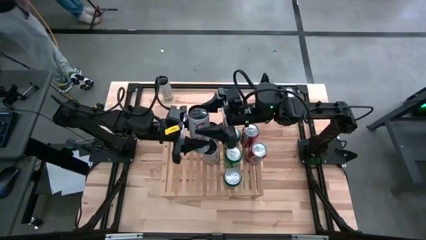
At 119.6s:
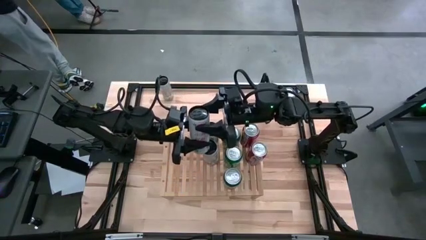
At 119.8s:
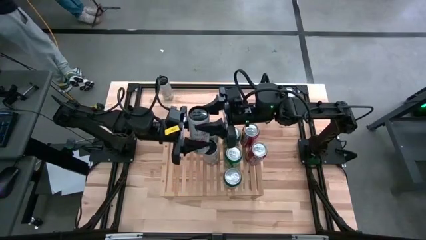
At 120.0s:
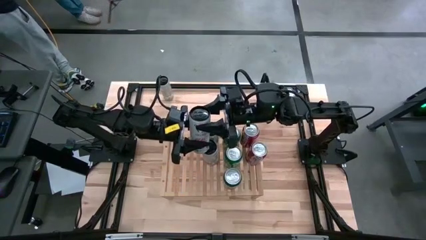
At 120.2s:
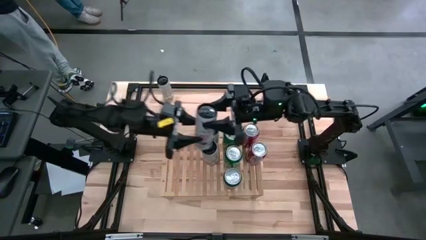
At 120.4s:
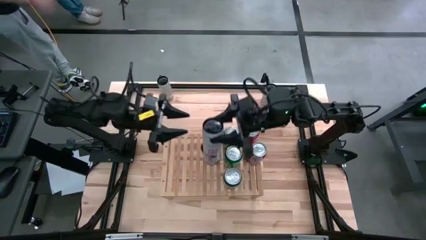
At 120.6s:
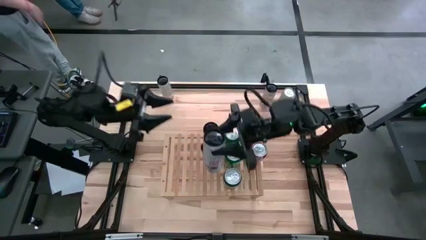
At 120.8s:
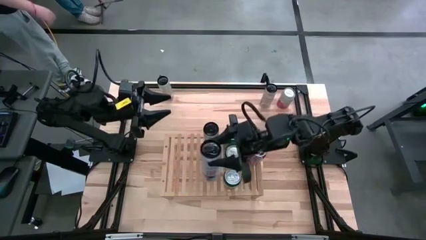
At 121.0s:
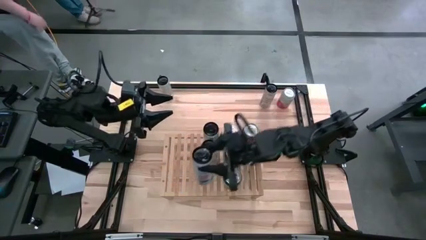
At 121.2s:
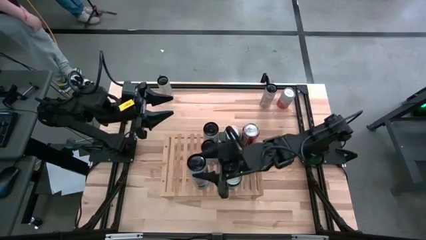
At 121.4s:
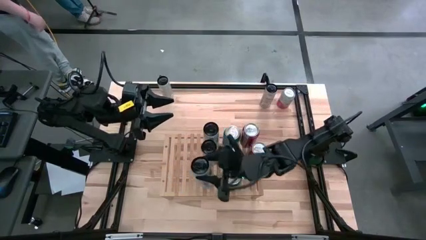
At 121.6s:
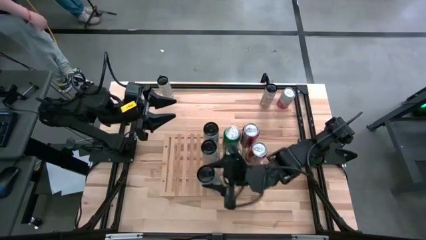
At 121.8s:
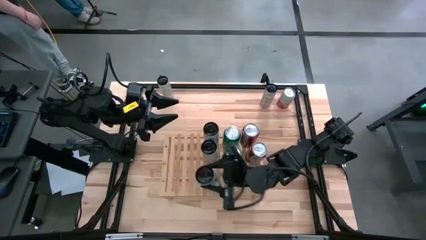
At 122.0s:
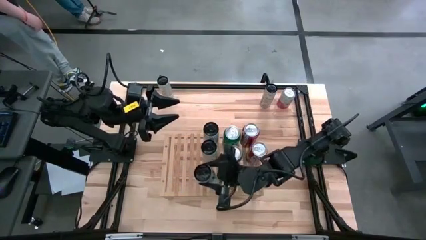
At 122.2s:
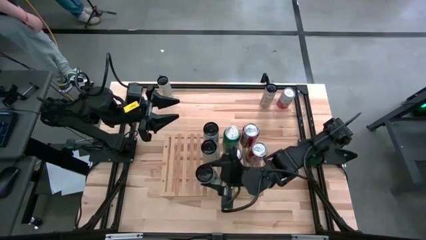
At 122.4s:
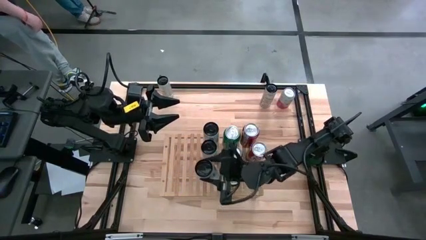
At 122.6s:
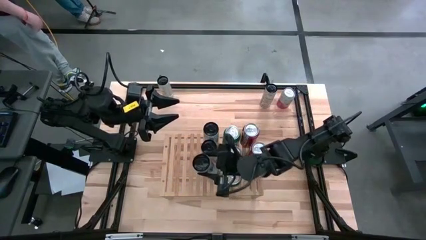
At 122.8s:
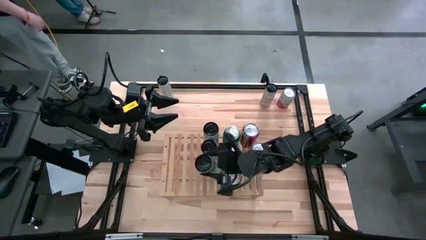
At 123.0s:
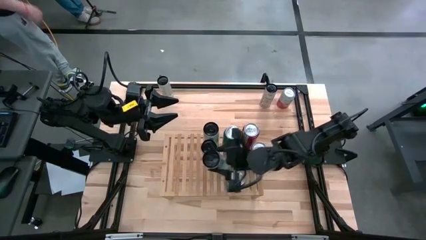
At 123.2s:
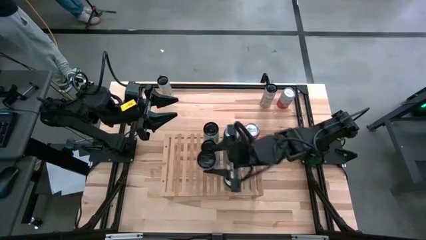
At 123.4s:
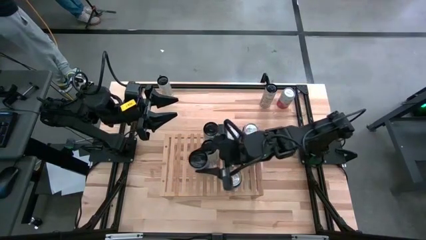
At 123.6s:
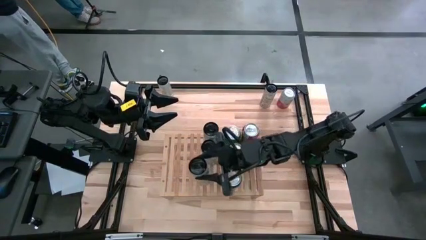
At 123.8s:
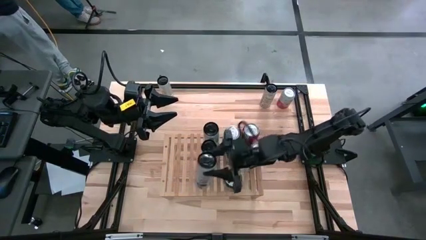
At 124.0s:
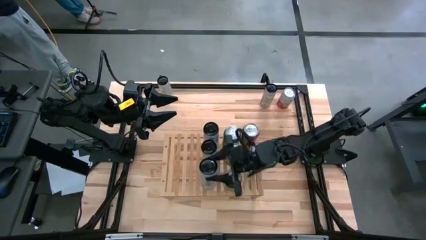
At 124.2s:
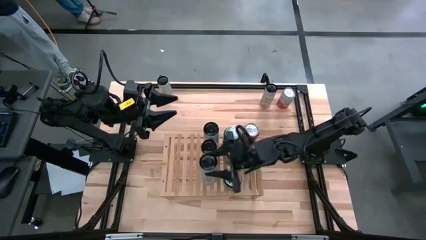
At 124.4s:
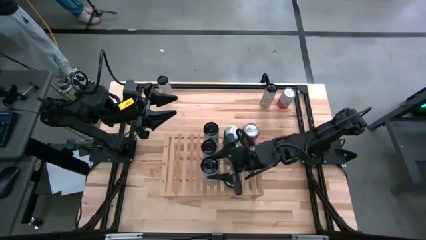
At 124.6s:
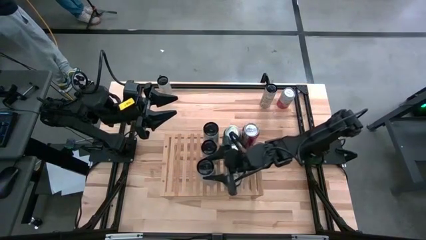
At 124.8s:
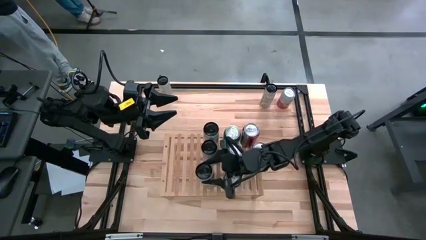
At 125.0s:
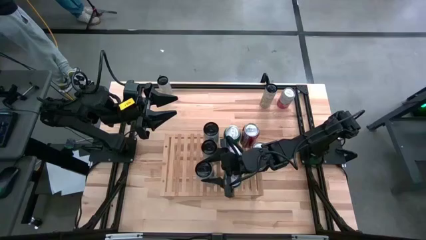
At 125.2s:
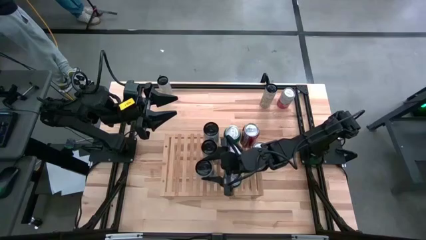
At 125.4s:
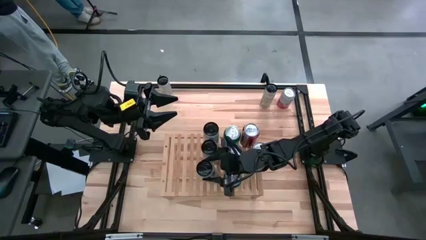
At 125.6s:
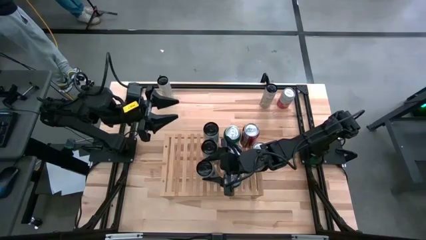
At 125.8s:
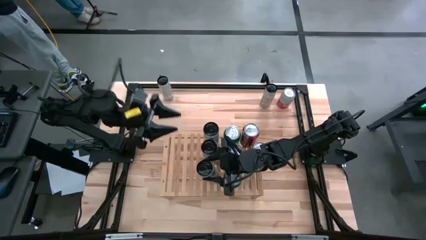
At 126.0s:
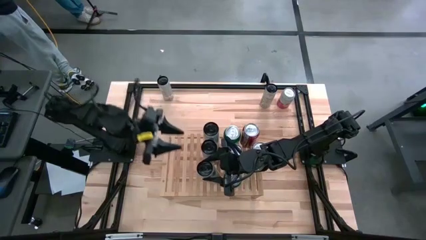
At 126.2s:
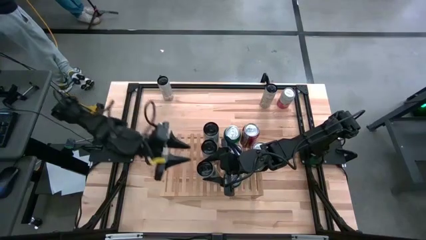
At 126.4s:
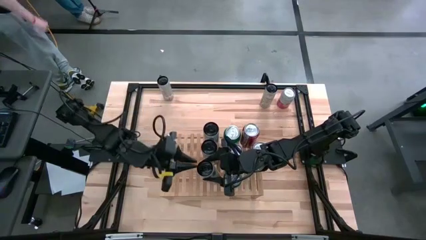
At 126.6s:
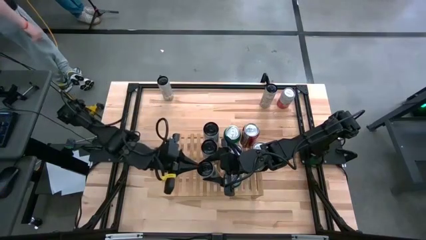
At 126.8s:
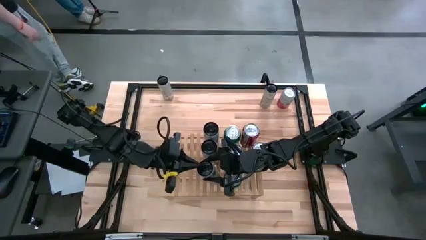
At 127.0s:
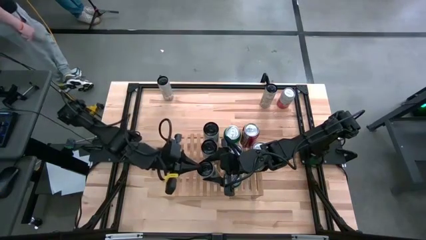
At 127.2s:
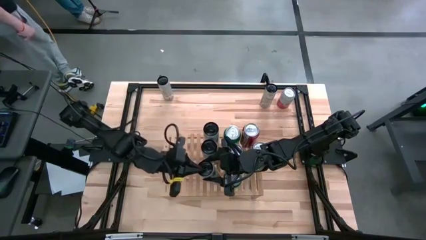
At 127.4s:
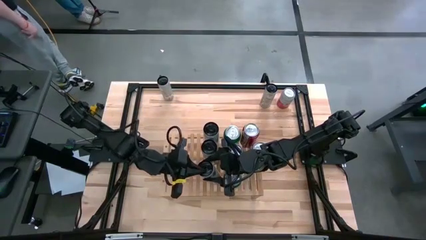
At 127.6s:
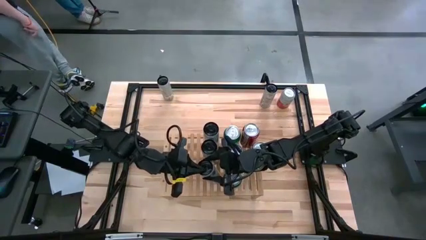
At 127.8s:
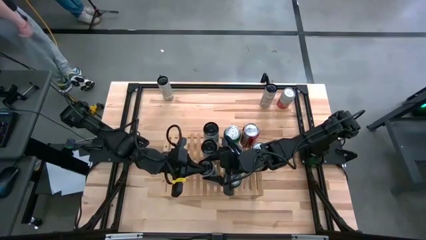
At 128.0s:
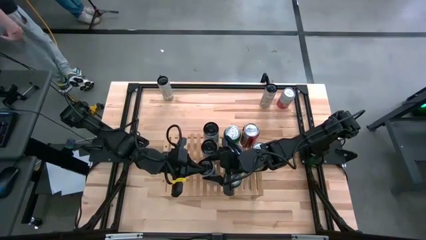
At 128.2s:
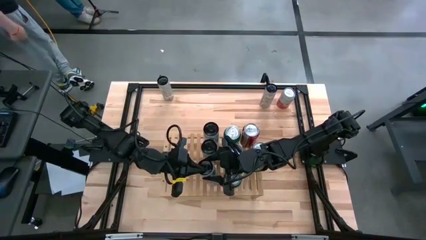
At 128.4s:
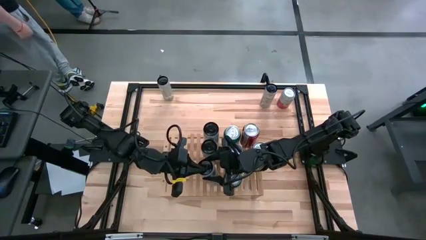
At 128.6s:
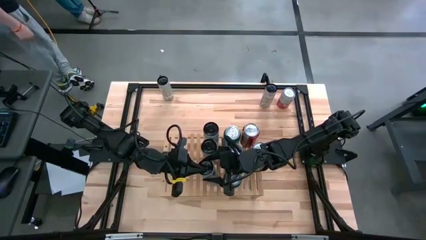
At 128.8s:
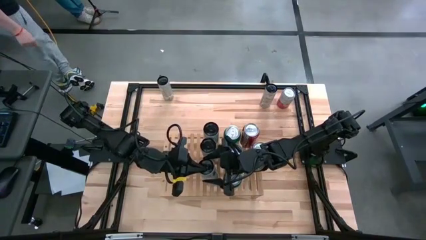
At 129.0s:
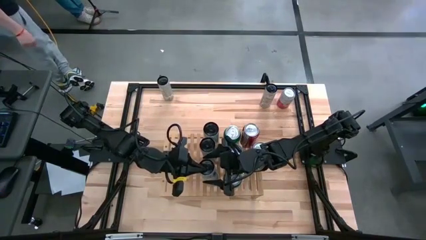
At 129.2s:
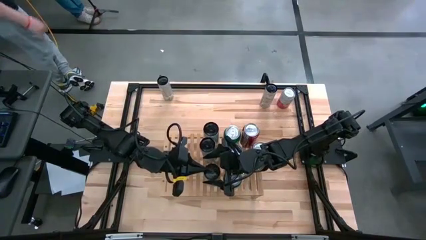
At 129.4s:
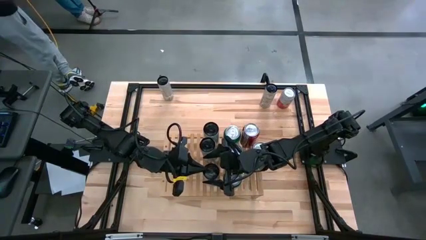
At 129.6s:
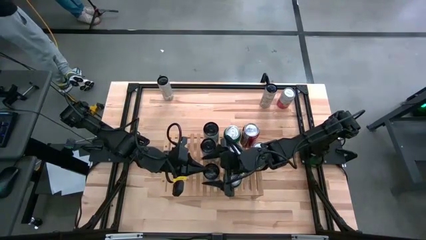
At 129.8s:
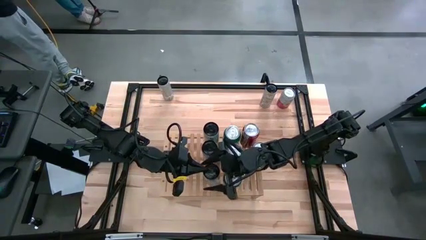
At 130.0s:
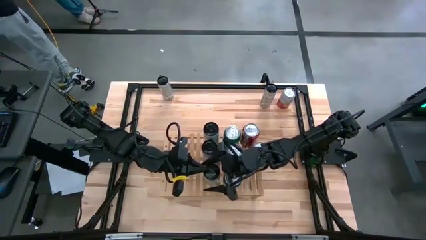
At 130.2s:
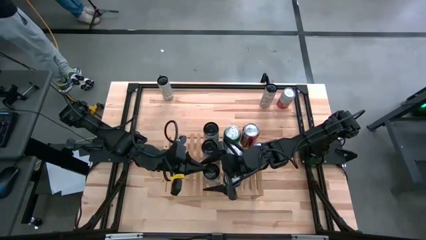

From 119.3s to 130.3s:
Task: Place canned beverage on shelf
Put the white-pink soda can on the shelf aligned with the other white-pink soda cans

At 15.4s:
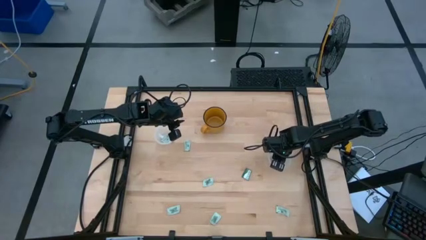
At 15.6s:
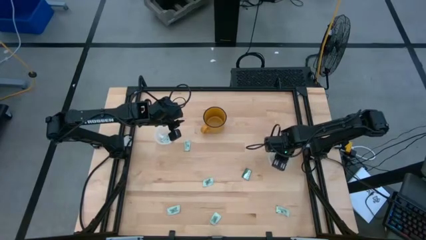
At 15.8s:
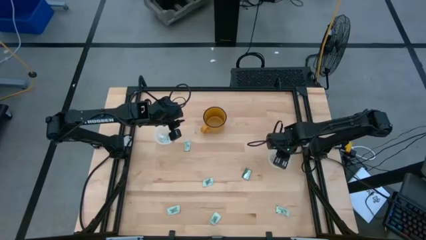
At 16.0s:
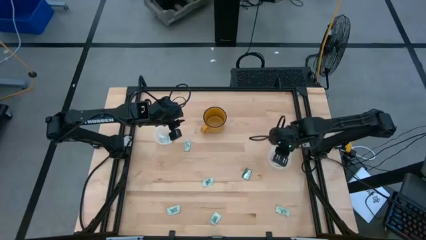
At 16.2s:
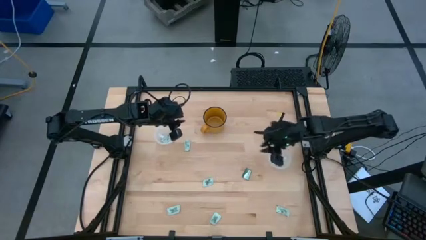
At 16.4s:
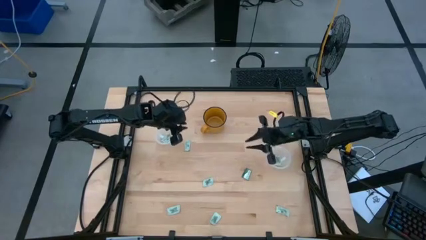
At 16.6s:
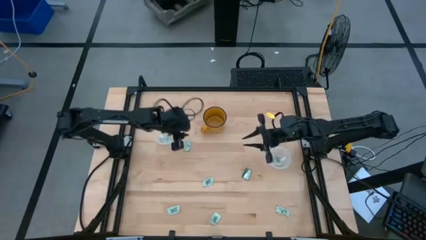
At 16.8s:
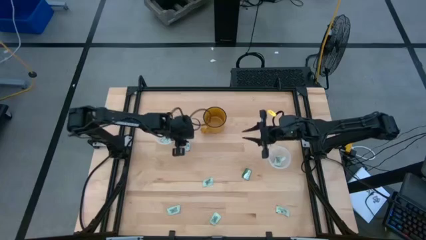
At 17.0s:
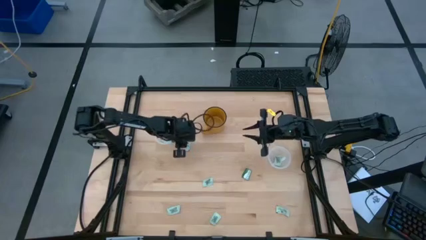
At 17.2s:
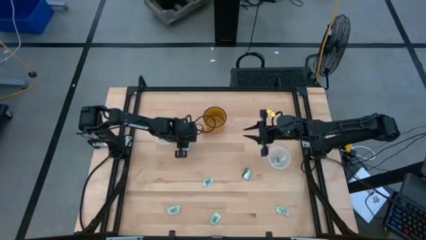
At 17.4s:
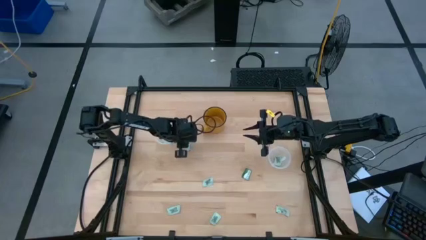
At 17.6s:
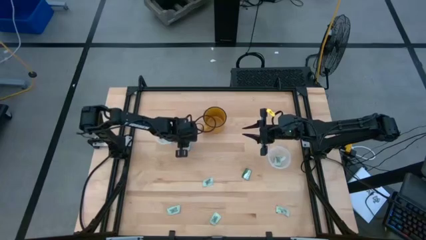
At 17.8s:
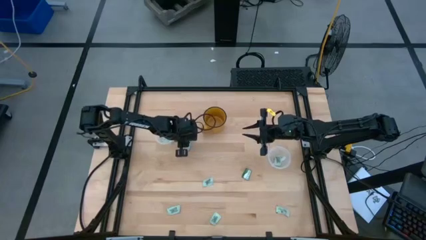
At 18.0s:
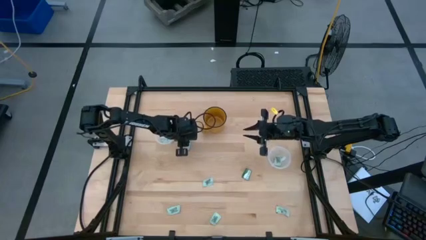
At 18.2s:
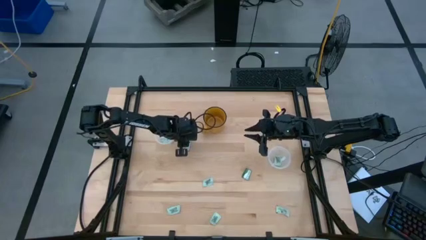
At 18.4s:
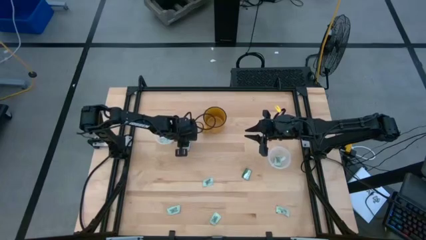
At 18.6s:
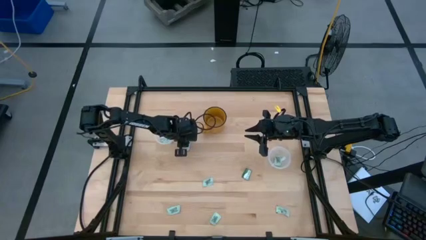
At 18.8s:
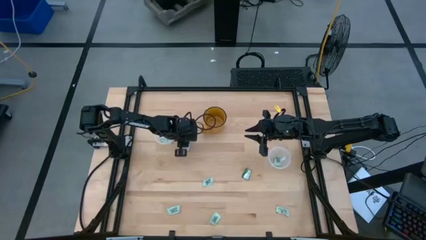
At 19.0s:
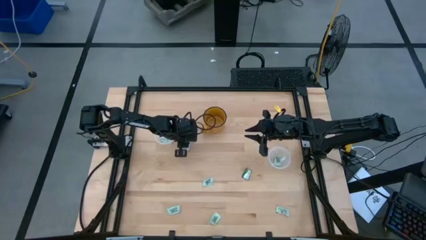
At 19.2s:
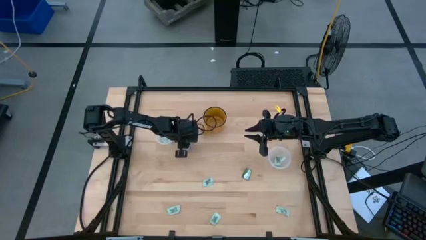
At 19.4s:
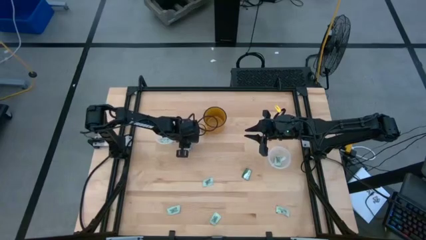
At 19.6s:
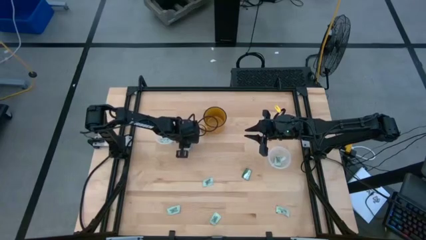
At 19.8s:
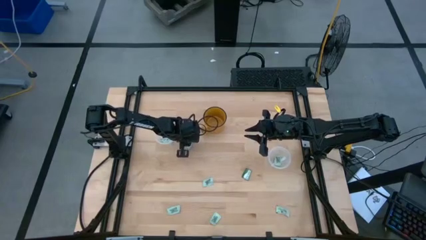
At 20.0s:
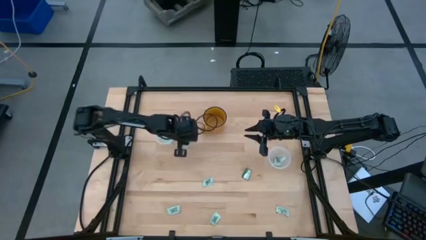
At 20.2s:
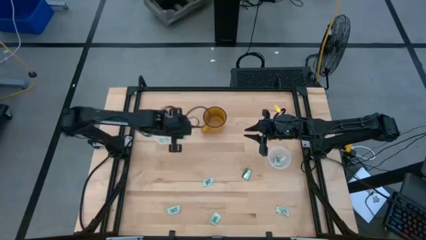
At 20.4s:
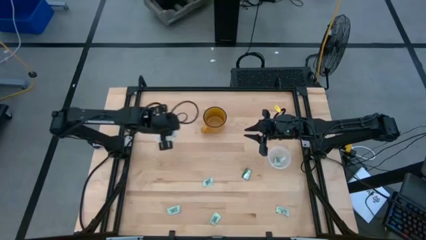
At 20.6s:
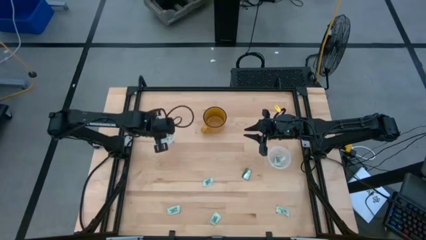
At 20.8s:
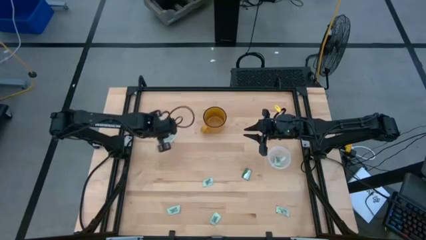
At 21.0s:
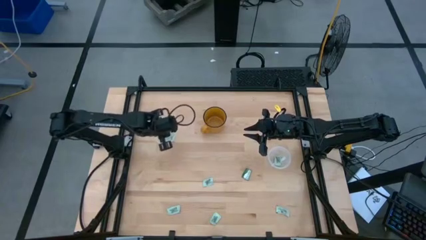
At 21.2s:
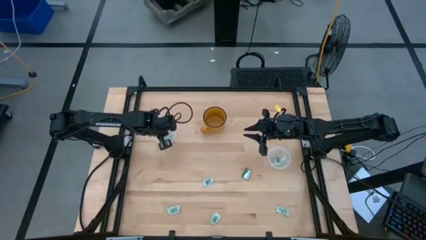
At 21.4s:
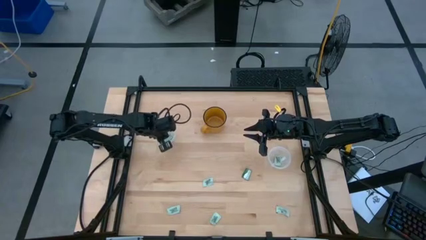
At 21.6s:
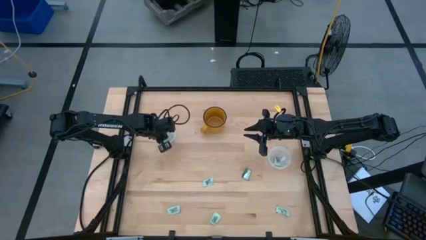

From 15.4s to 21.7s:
Task: Pick and place Stevia / Truvia into bins
Put the light green stevia packet into the left transparent container
